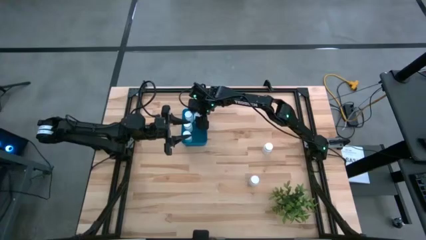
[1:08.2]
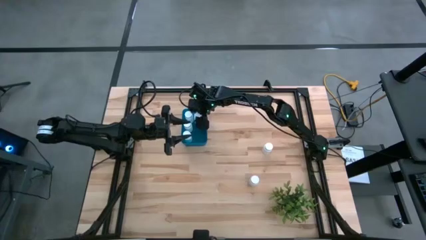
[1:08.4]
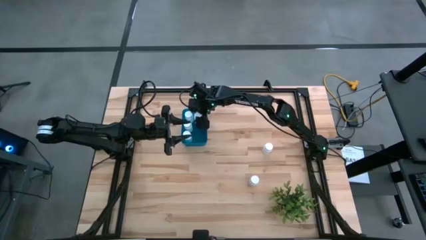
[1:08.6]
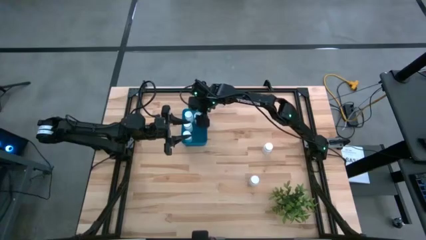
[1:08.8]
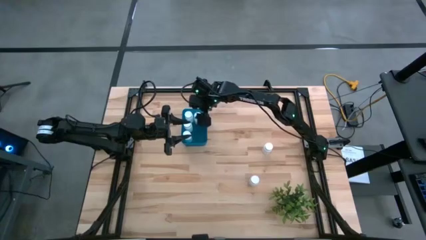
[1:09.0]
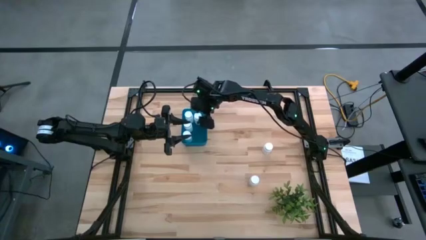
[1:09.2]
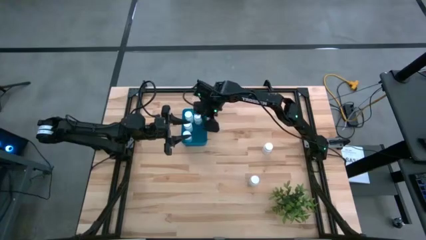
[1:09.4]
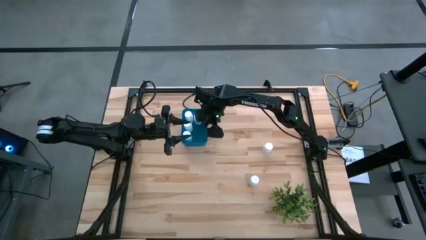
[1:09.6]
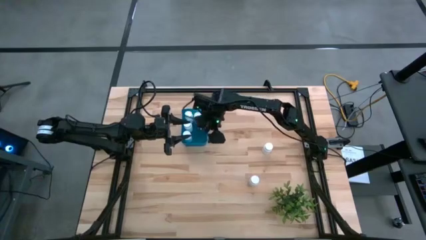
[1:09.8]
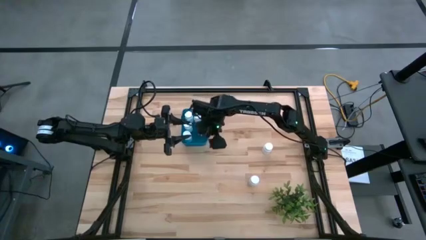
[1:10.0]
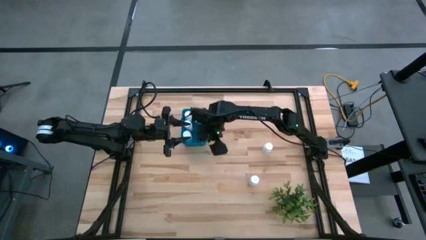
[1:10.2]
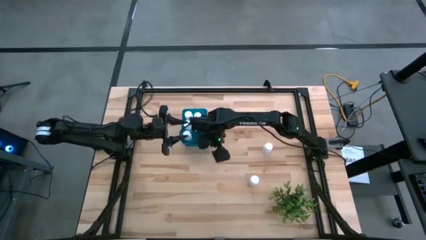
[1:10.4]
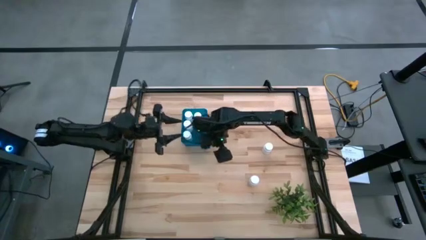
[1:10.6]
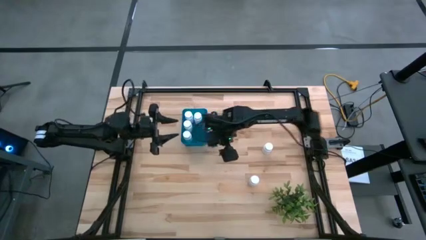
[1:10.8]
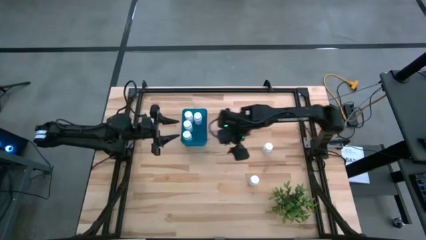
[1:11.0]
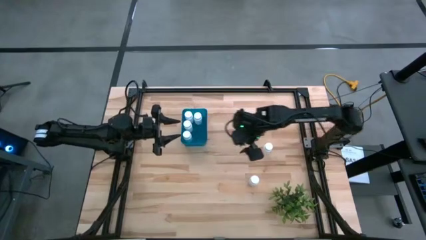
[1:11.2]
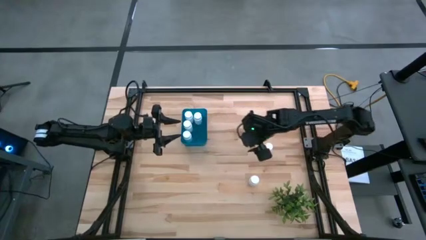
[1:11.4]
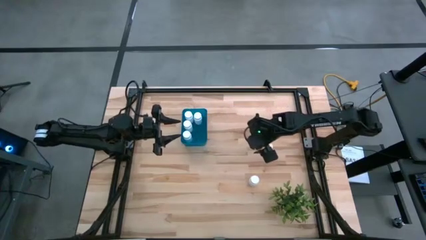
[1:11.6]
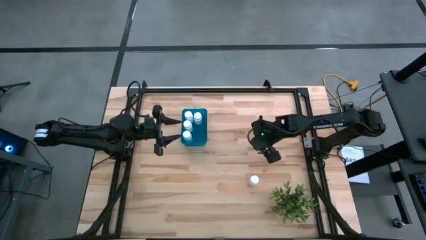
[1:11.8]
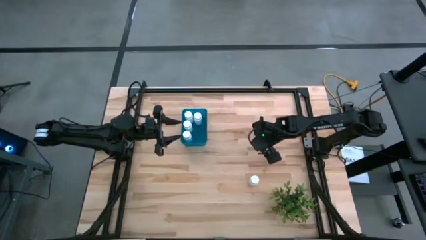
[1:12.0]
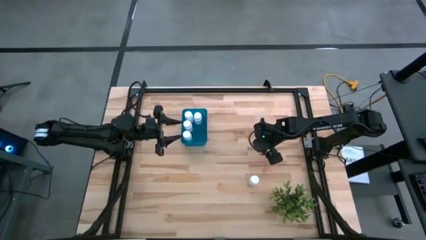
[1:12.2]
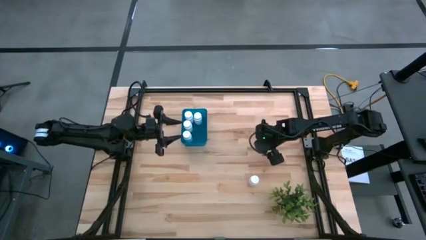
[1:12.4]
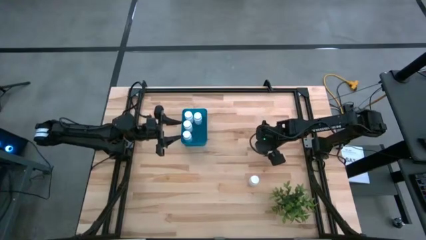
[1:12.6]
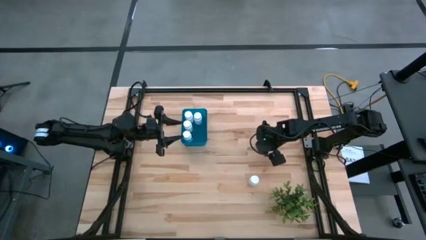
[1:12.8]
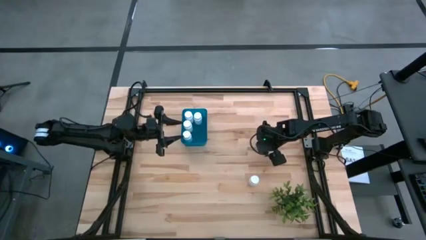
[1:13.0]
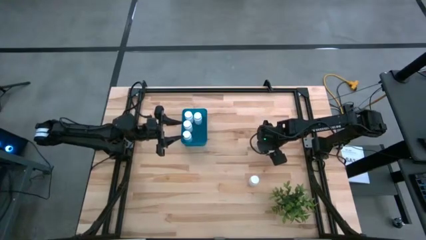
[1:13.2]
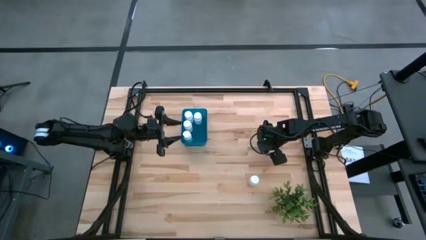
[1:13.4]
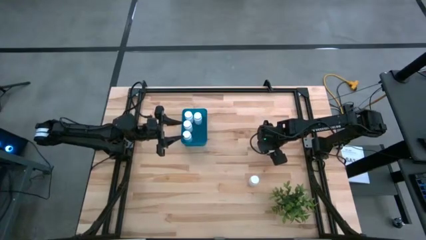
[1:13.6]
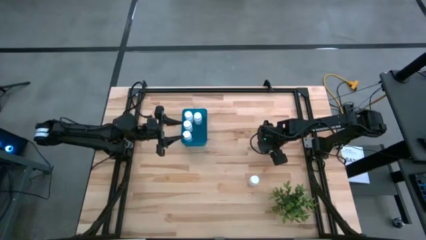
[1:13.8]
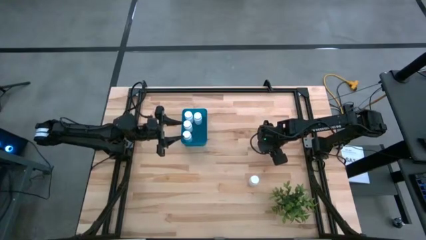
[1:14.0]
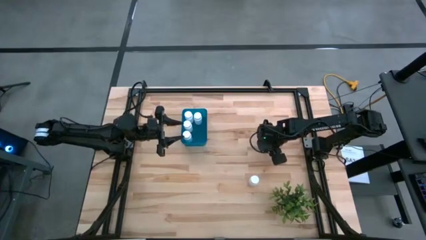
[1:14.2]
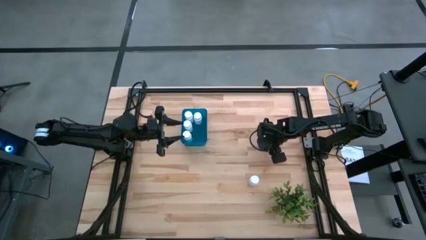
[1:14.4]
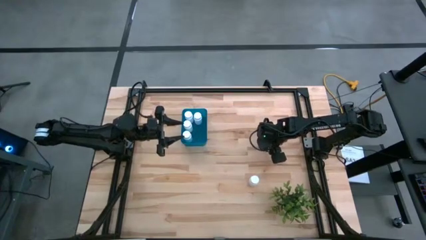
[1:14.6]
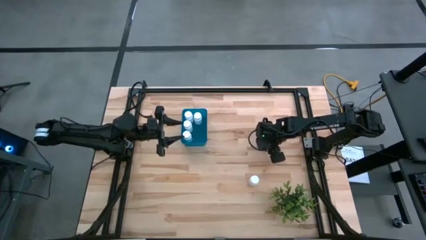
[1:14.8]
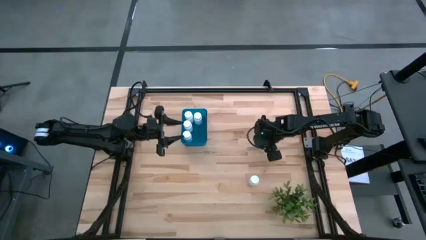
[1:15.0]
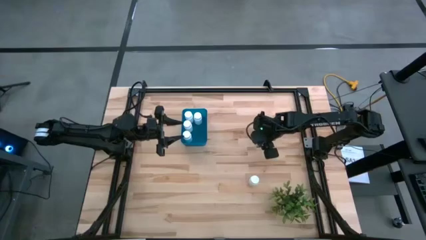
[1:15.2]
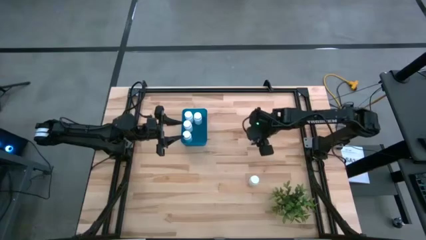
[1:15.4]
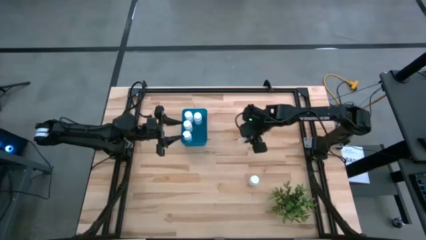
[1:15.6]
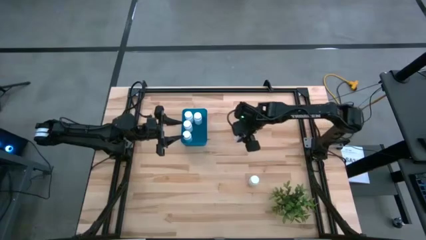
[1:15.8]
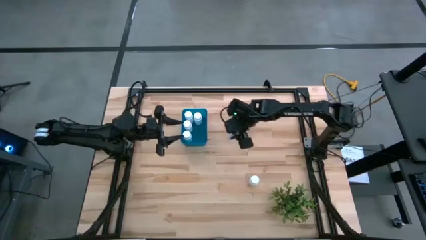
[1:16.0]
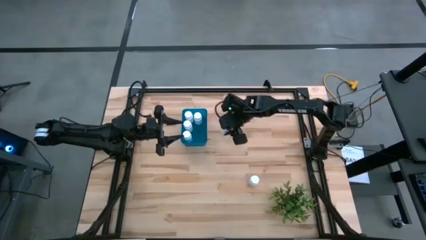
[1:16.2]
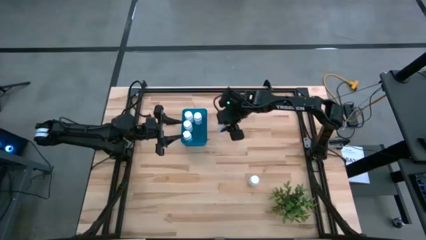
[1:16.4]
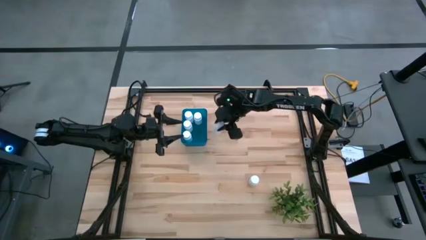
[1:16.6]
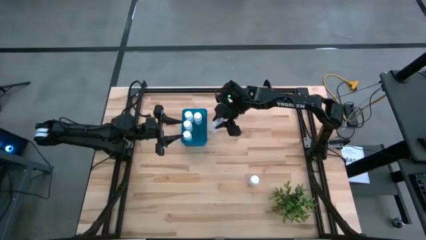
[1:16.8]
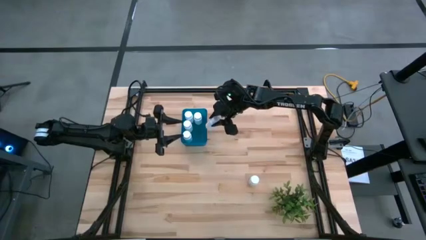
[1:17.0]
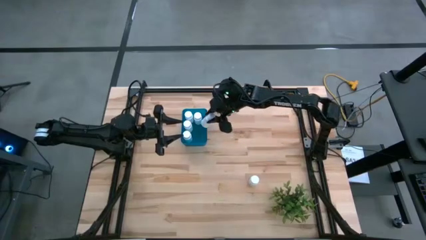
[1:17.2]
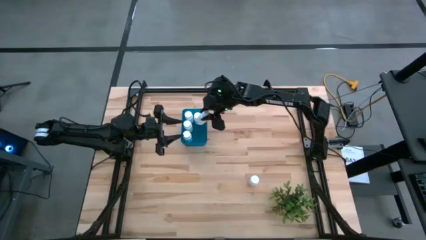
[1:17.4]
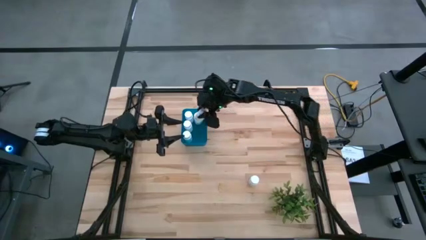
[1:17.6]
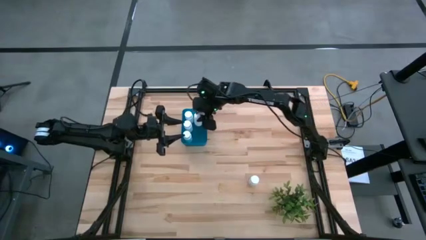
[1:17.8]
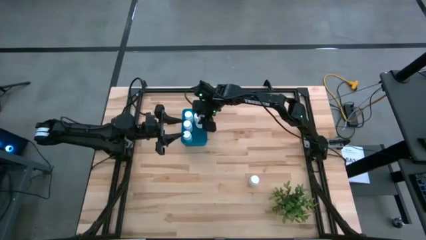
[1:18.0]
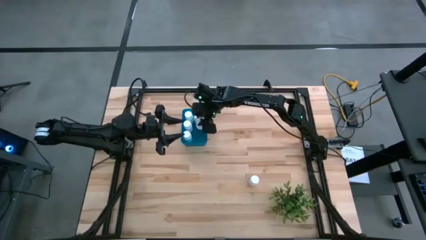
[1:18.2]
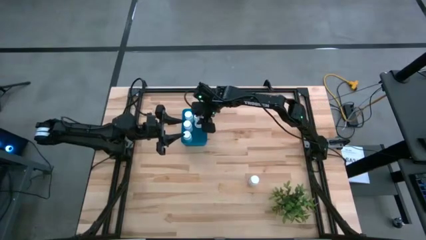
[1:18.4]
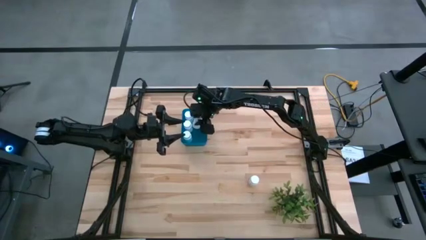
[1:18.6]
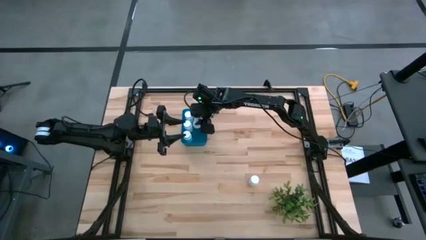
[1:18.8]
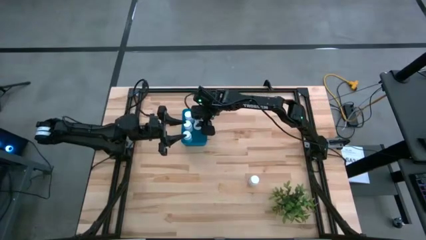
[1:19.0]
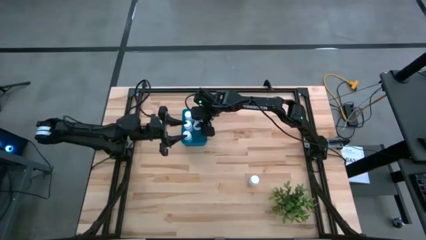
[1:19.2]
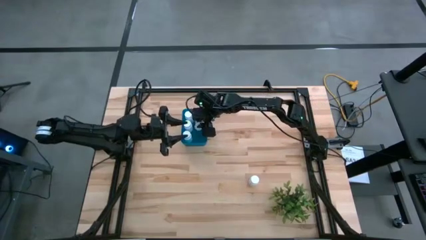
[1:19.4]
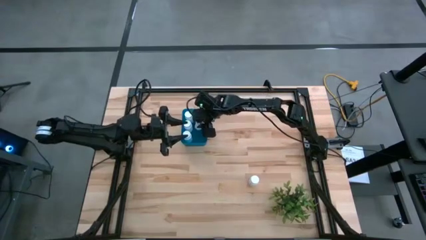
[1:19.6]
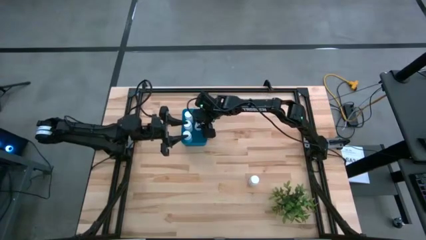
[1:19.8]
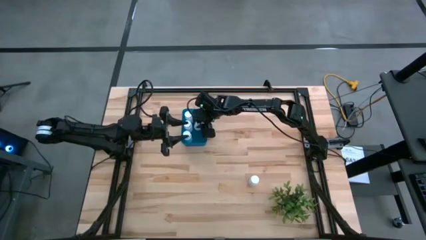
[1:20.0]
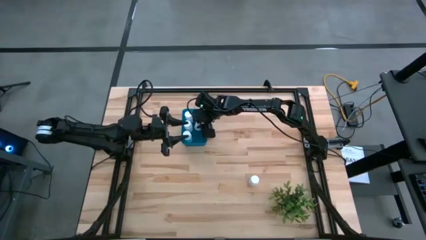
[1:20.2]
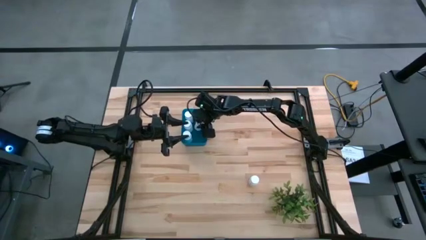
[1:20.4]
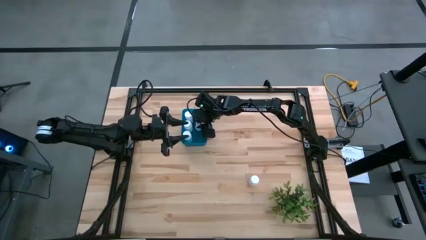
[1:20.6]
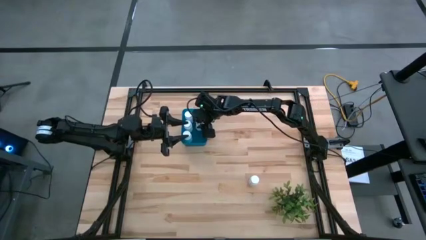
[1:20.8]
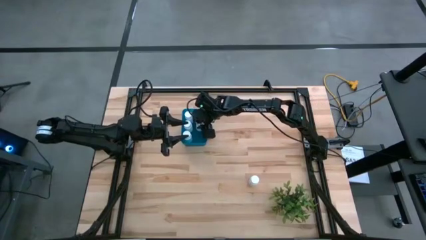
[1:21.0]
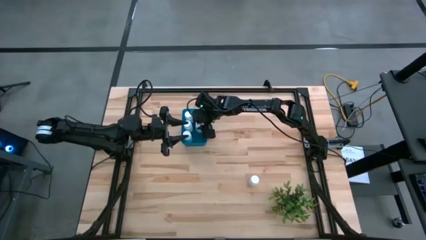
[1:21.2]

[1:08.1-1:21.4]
Task: Pick and place pill bottles into a basket
Put the white medicine bottle into the blue bin

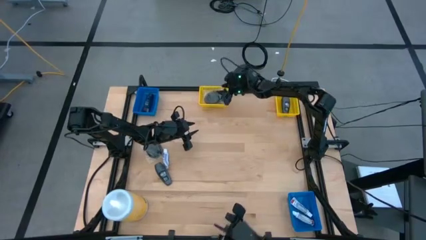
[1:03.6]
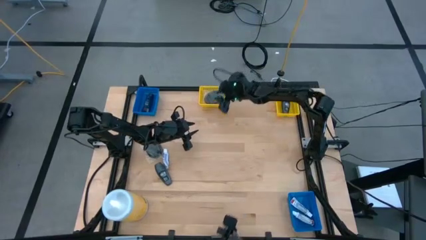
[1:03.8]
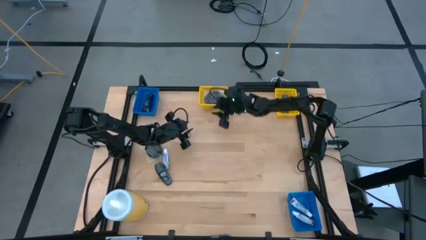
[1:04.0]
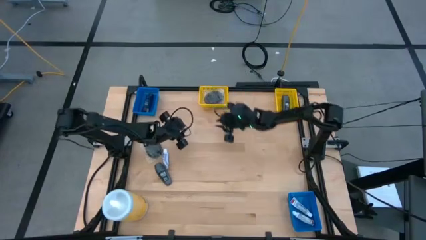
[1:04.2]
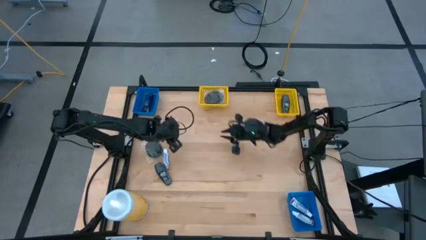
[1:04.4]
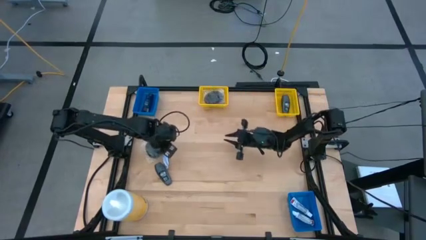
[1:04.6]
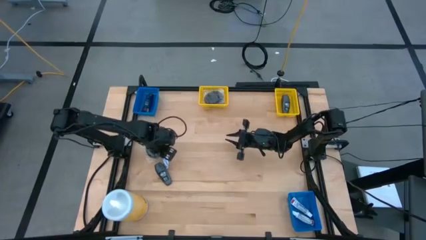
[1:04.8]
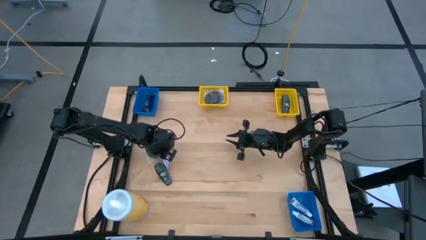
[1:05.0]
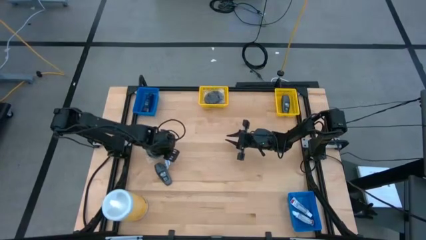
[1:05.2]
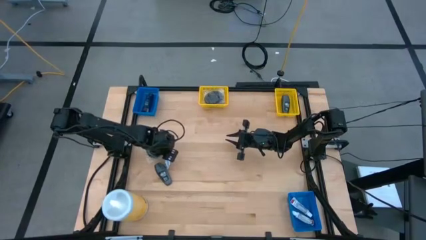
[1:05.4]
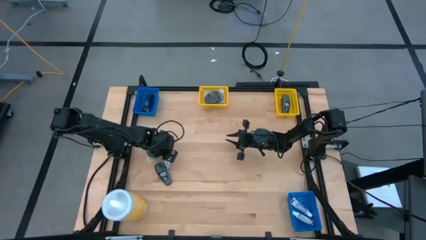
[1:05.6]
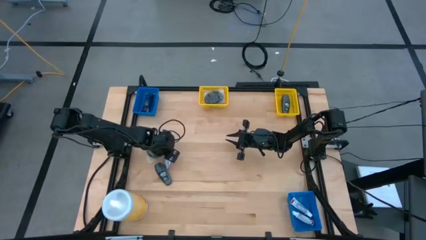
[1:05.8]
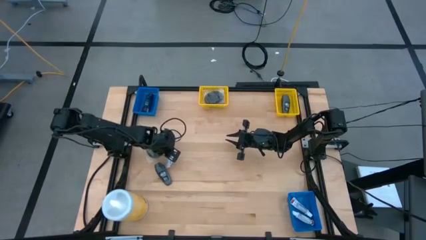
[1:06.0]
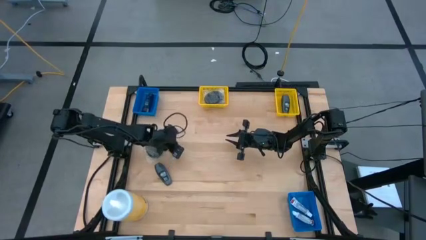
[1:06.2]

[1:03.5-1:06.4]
Task: Pick & Place Travel size toiletries
Put the toothpaste into the bottom blue bin
